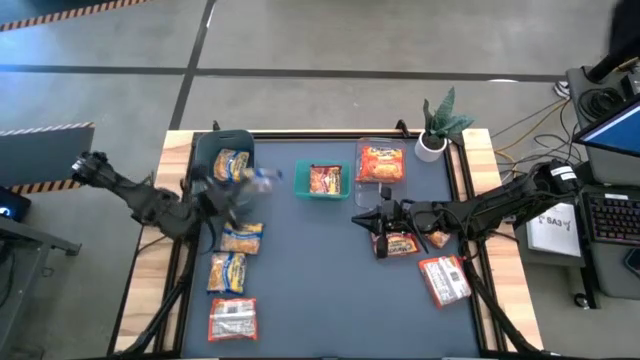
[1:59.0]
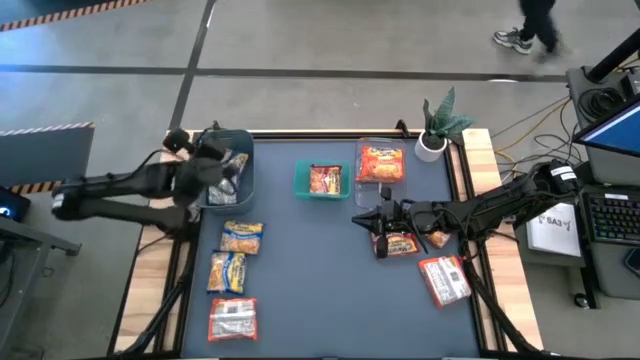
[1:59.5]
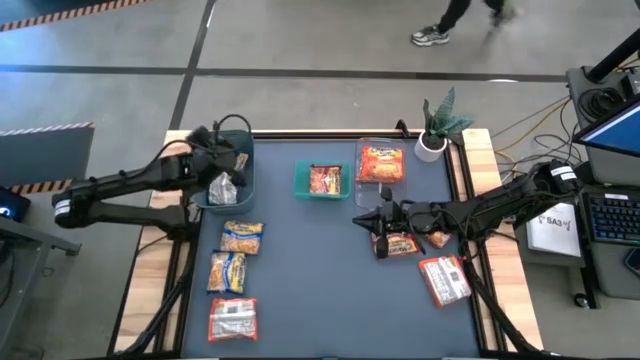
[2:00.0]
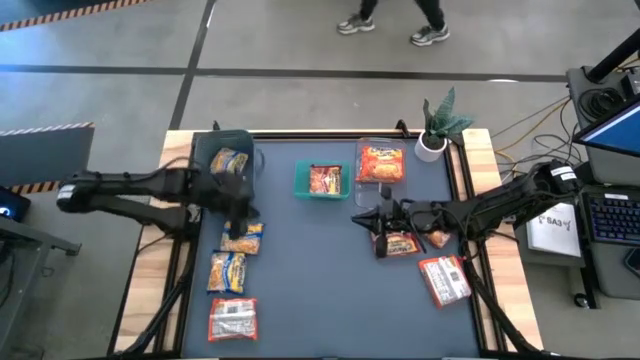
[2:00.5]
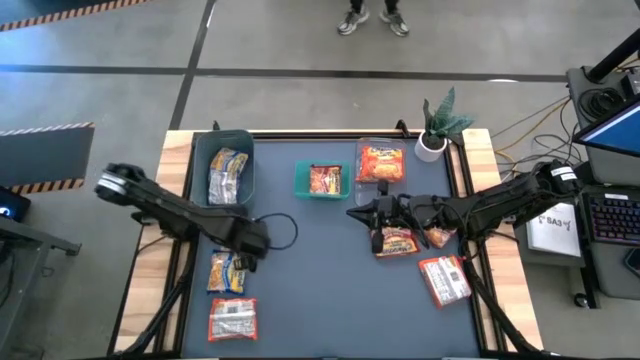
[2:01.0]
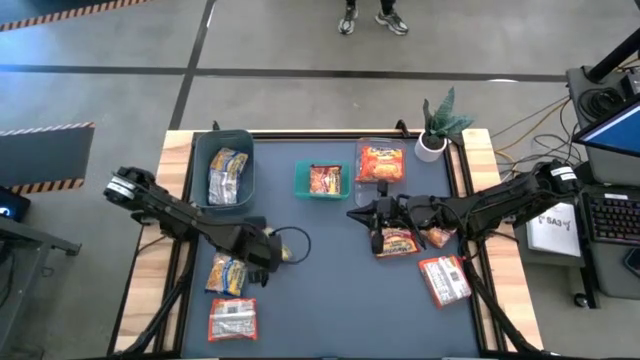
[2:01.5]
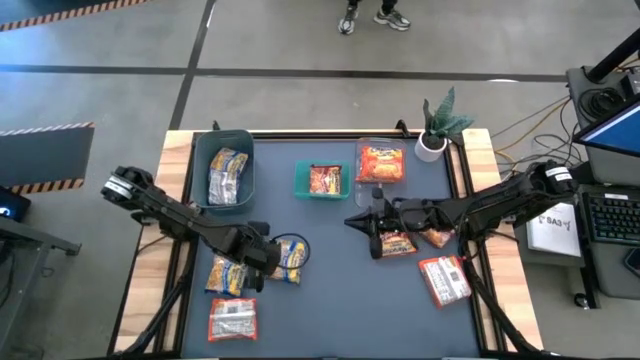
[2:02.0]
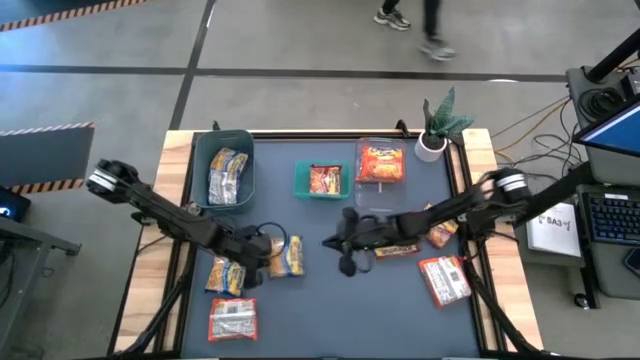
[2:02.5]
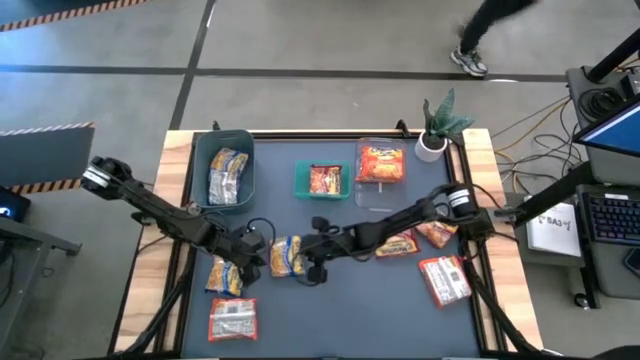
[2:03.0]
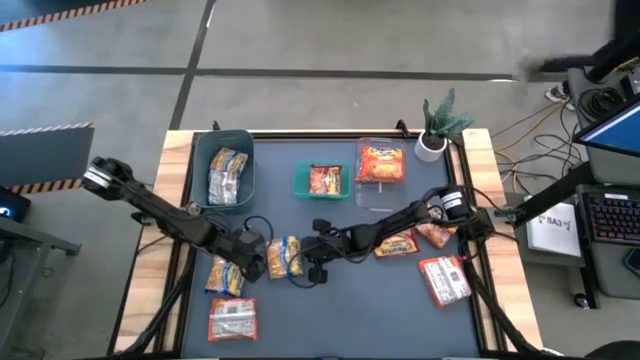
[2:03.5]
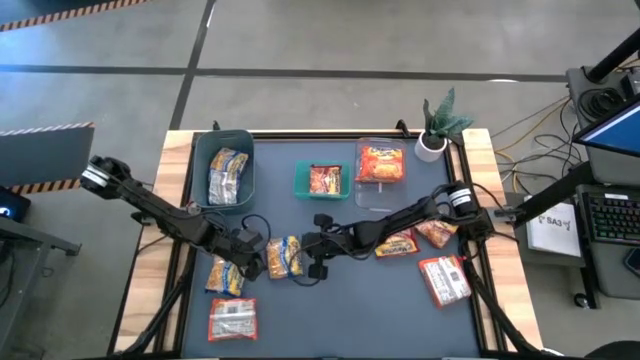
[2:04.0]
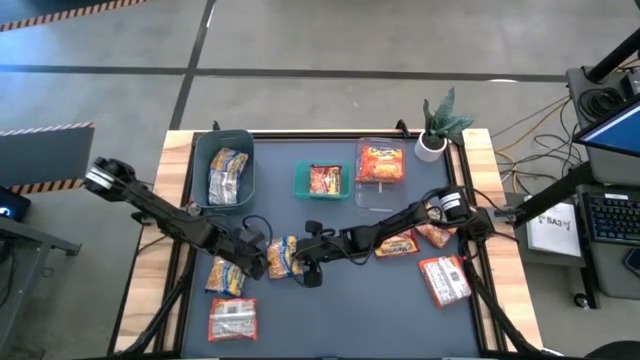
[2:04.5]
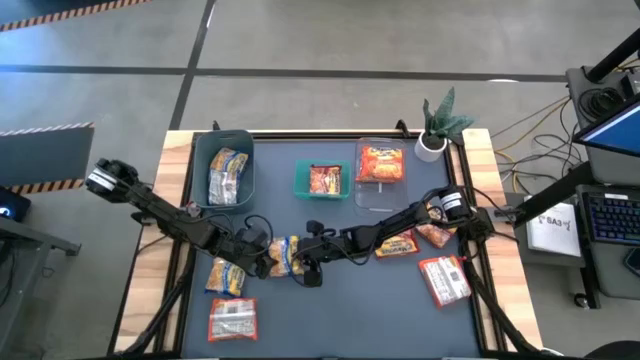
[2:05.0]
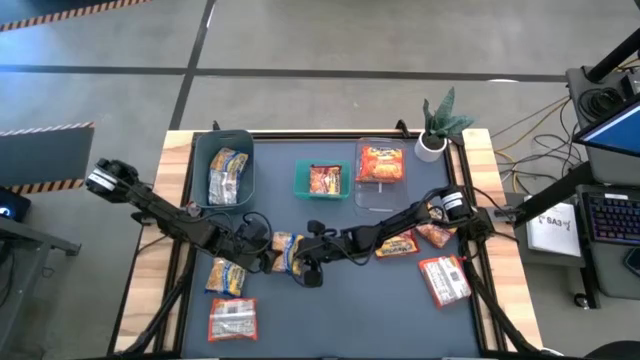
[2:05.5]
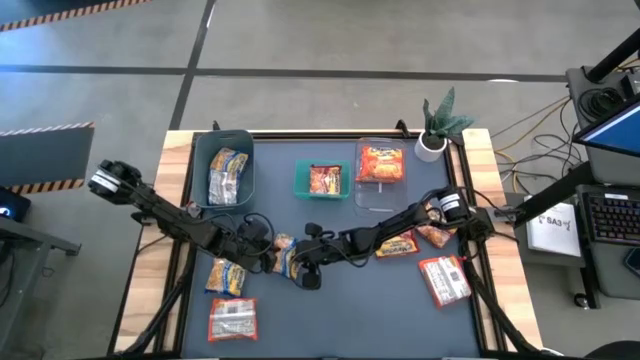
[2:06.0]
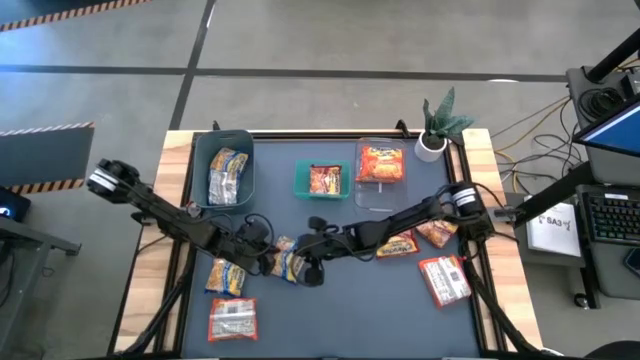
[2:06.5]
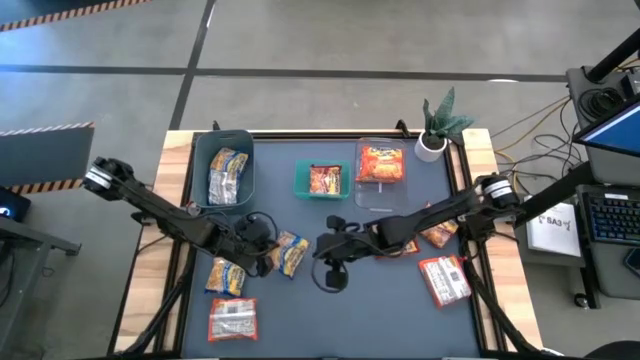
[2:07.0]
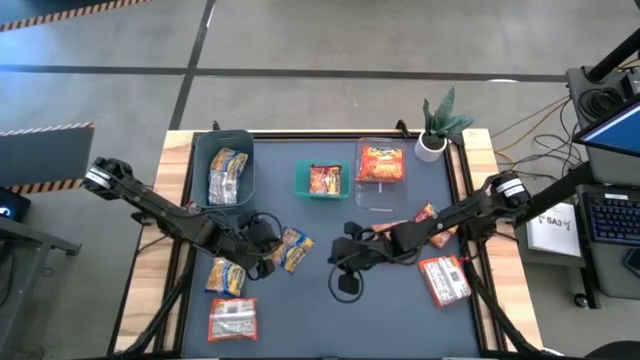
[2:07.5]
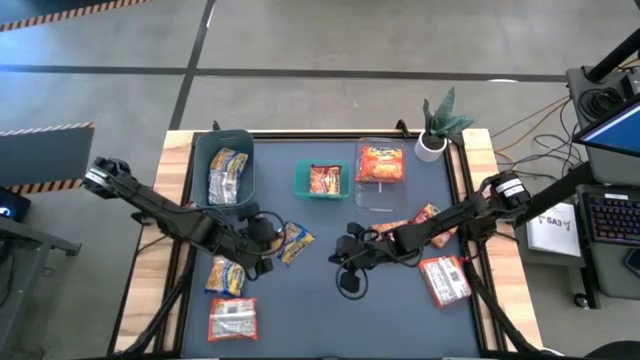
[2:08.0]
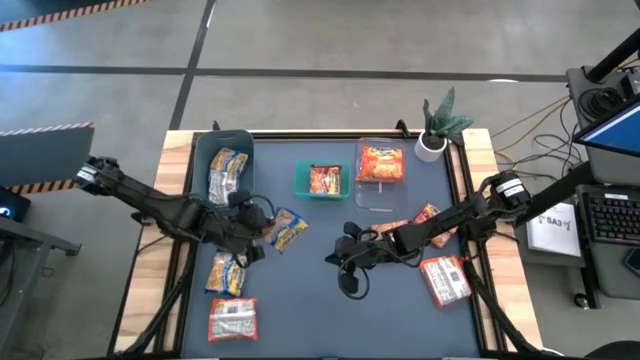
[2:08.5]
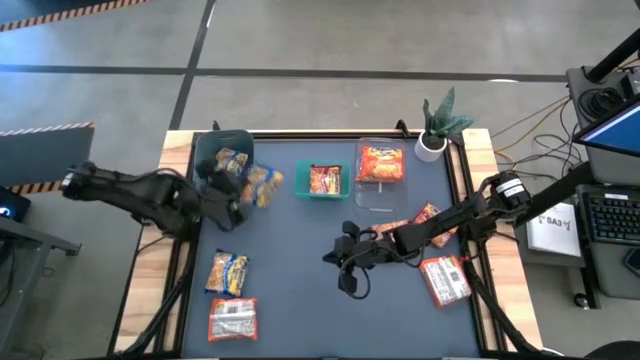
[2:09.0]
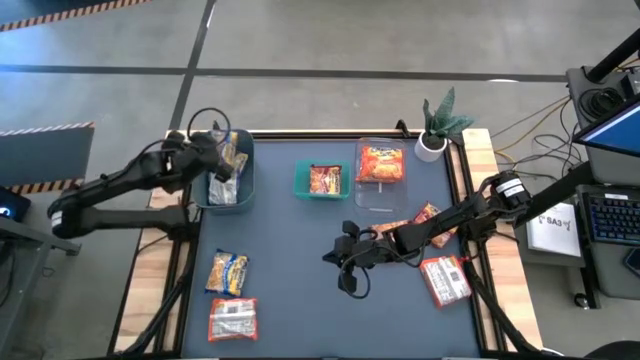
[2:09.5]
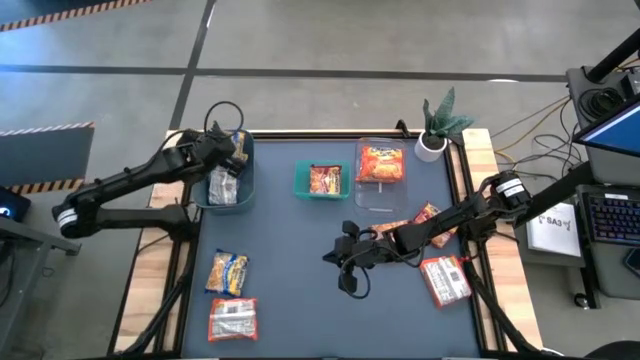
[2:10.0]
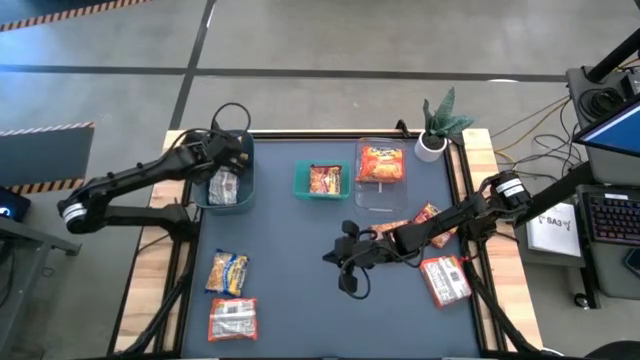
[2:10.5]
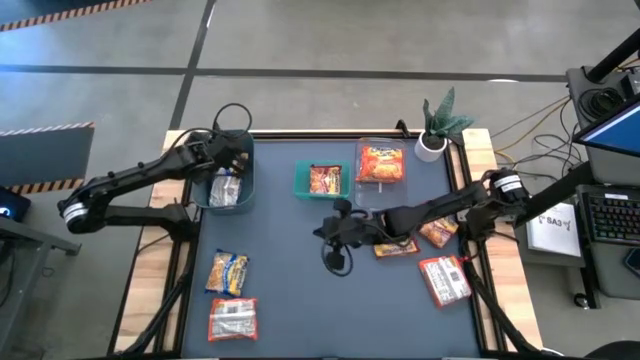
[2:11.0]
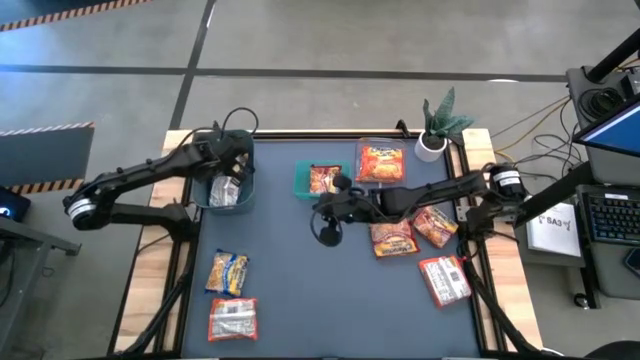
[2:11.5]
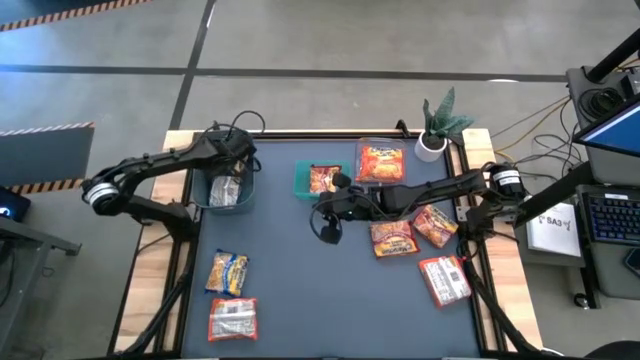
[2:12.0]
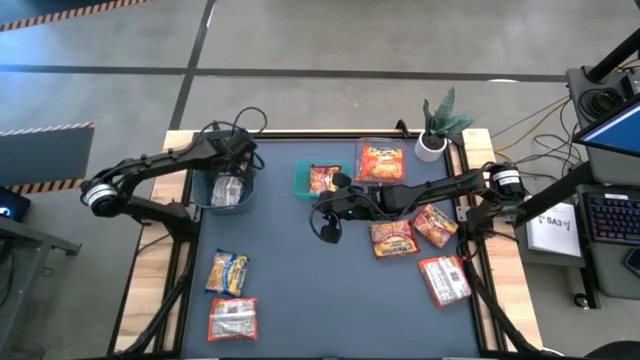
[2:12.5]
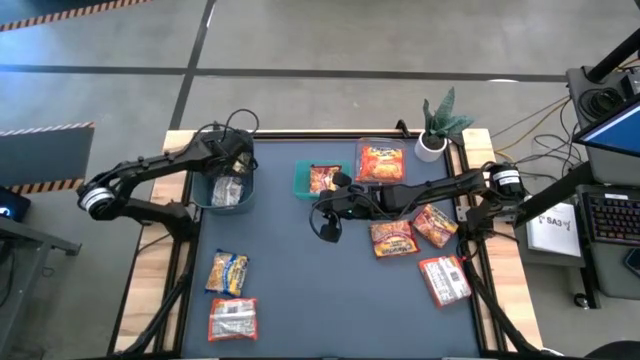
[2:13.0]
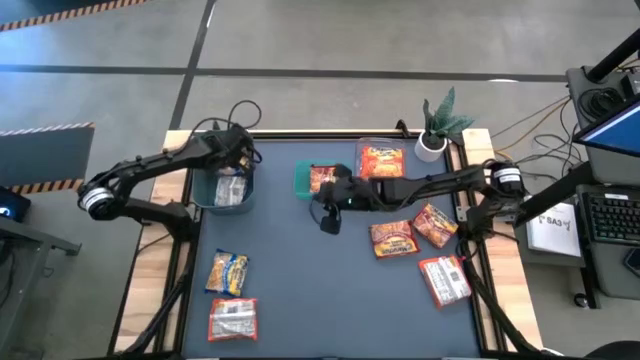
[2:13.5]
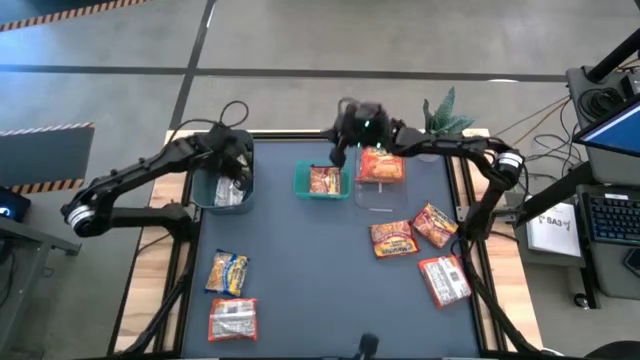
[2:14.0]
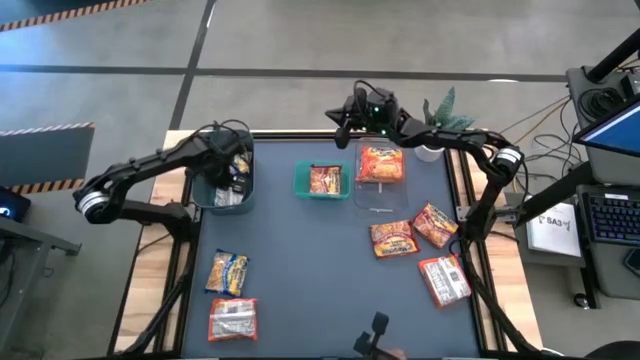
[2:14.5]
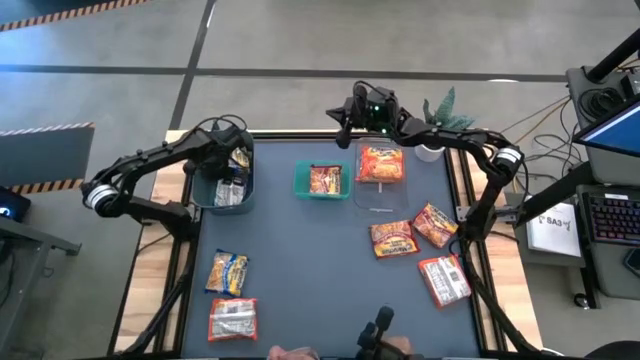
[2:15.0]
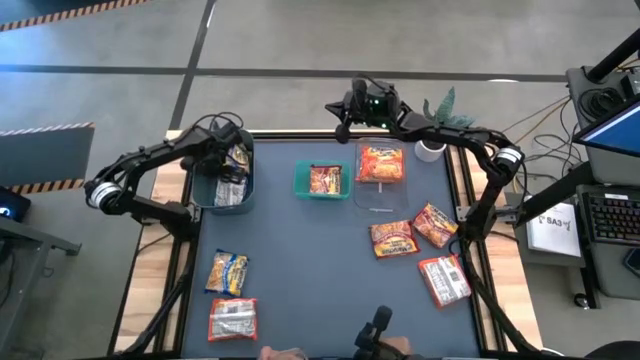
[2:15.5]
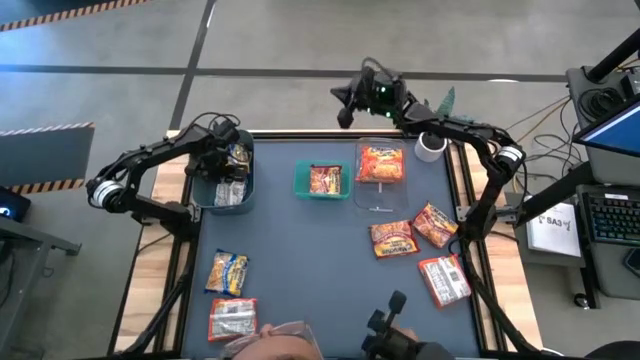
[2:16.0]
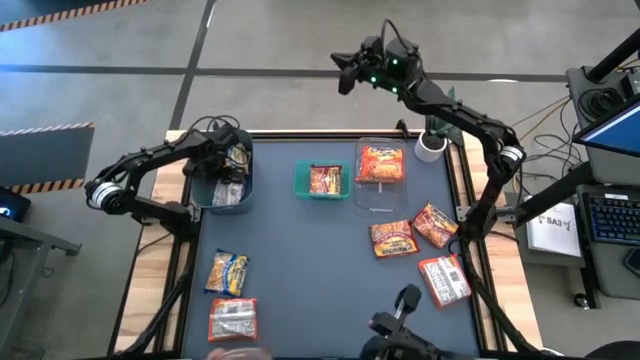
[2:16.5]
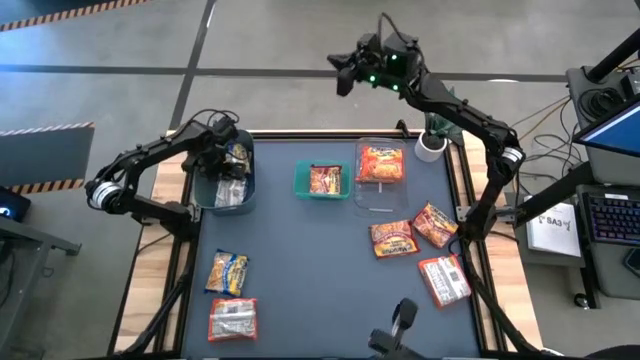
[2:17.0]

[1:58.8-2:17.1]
Task: Sort Maruchan noodles
Put the top blue noodle pack into the dark blue bin

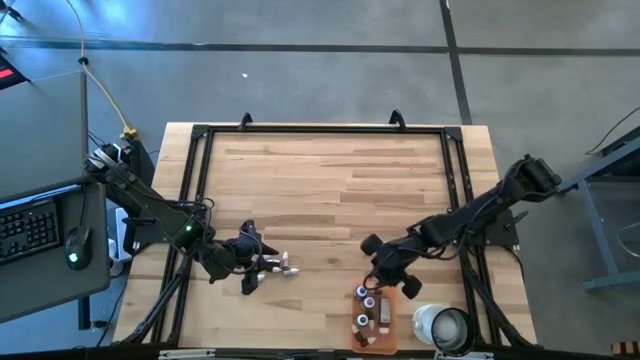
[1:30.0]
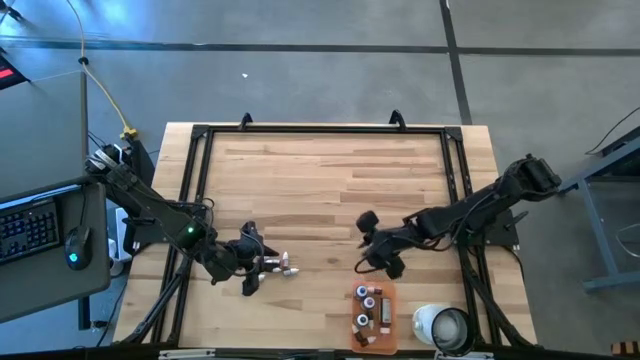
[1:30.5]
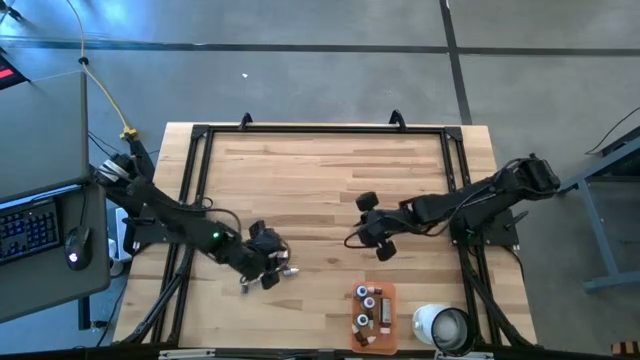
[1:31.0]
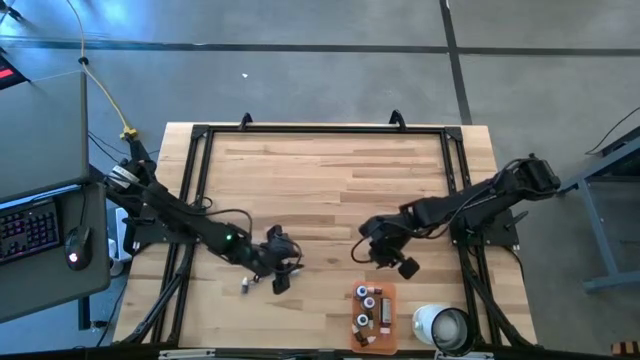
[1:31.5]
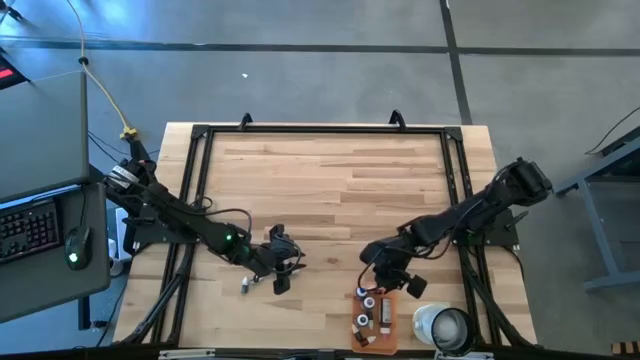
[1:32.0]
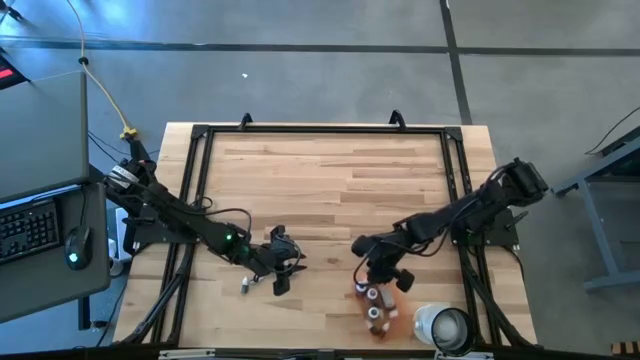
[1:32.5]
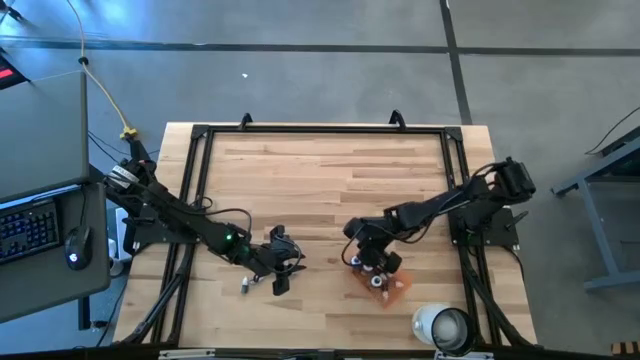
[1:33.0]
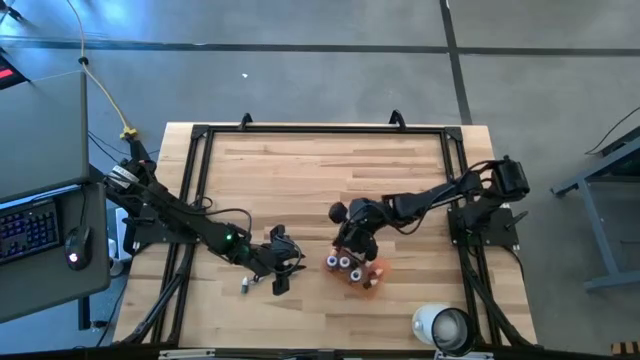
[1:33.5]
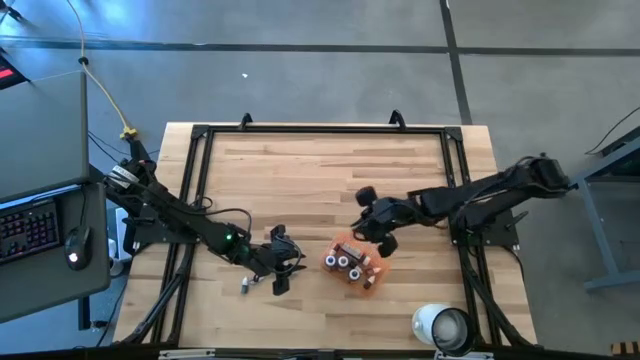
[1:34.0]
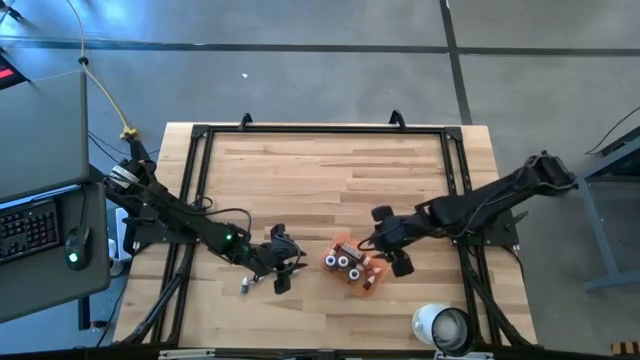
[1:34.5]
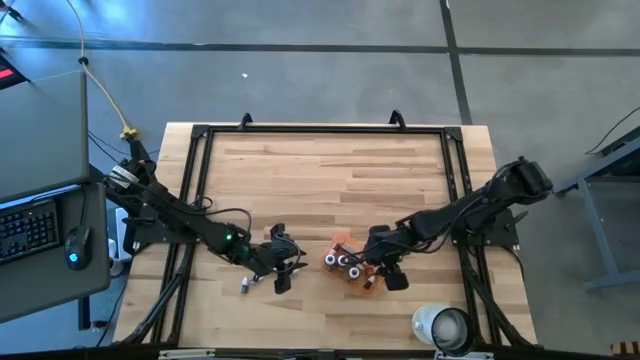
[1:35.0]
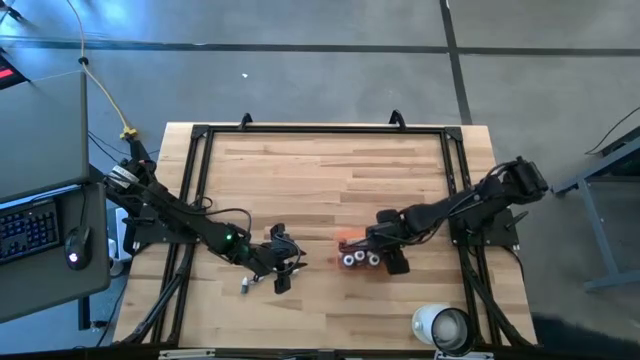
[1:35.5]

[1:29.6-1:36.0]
Task: Pick & Place food coloring
Adjust the orange bin
